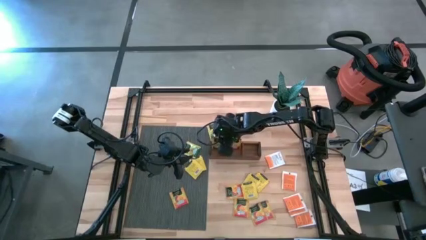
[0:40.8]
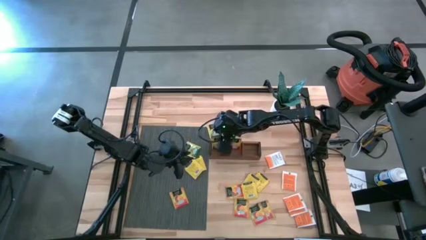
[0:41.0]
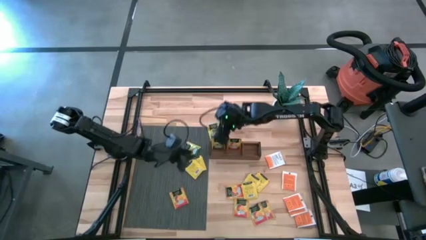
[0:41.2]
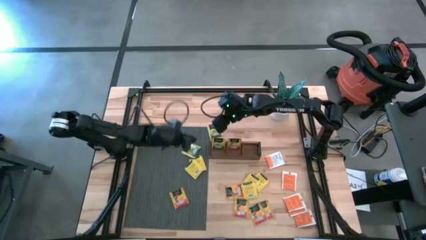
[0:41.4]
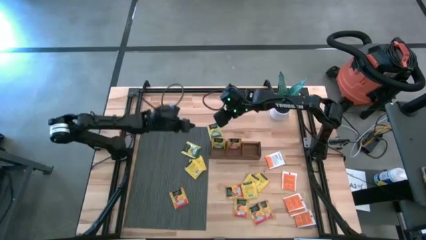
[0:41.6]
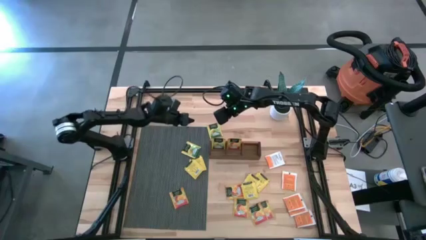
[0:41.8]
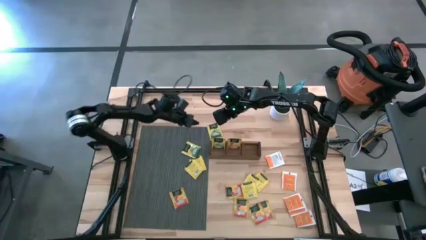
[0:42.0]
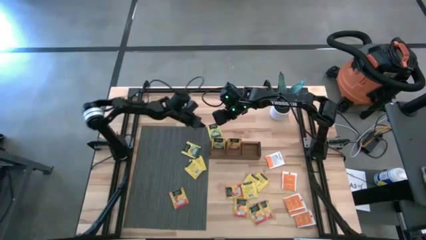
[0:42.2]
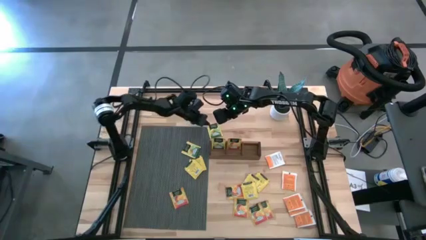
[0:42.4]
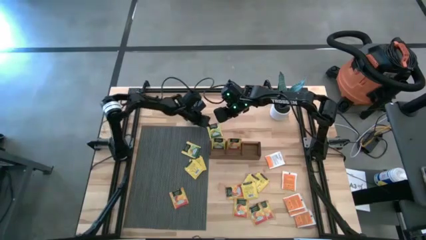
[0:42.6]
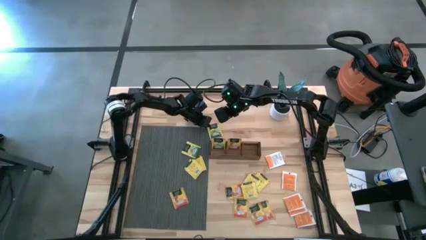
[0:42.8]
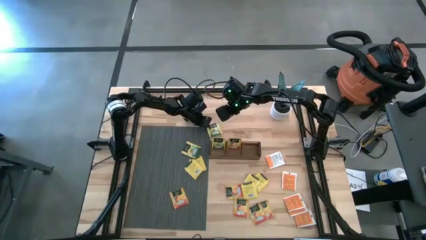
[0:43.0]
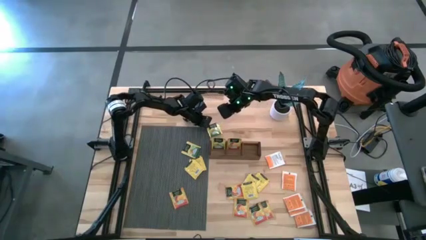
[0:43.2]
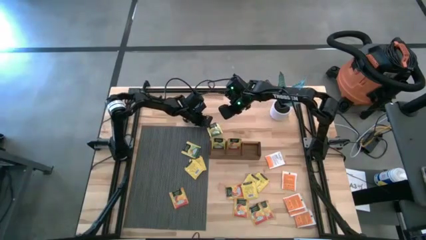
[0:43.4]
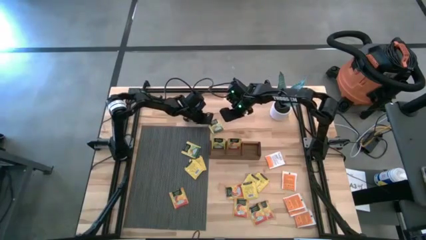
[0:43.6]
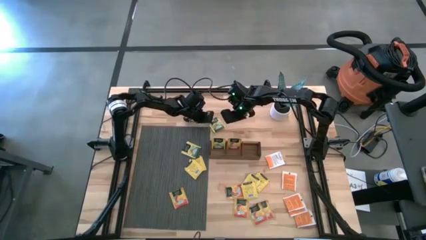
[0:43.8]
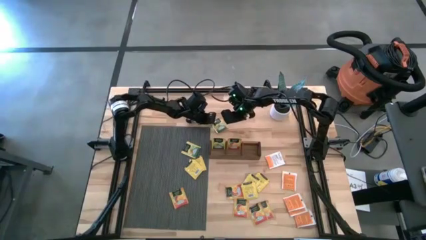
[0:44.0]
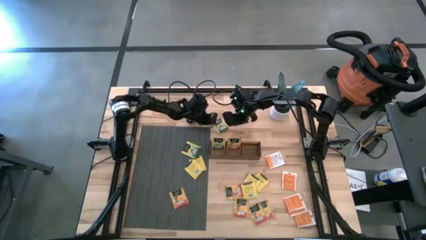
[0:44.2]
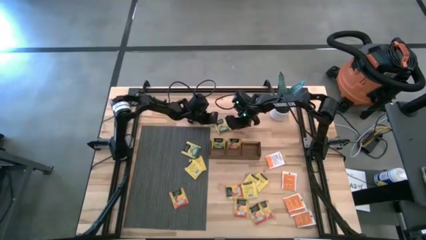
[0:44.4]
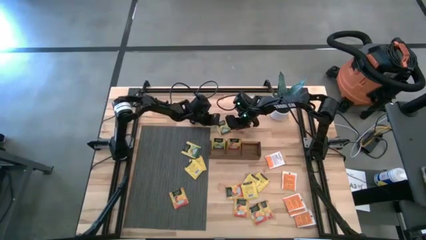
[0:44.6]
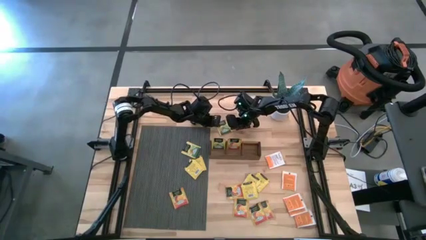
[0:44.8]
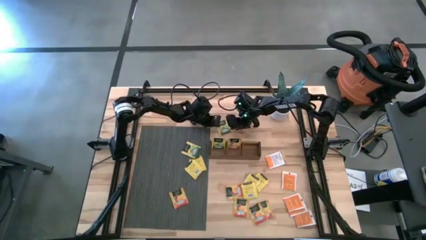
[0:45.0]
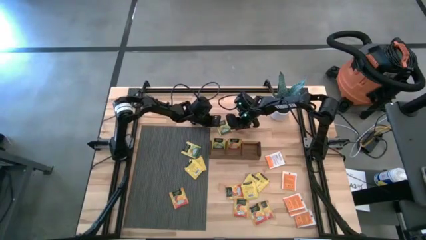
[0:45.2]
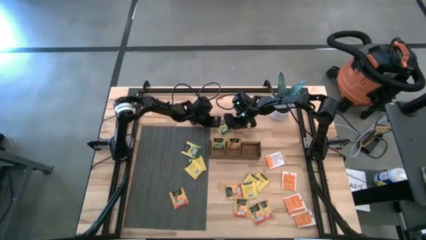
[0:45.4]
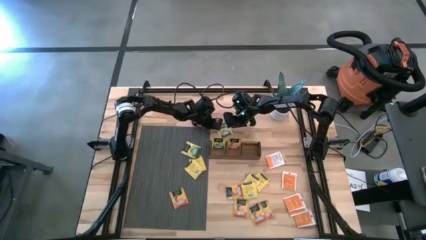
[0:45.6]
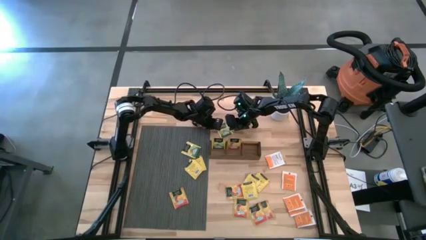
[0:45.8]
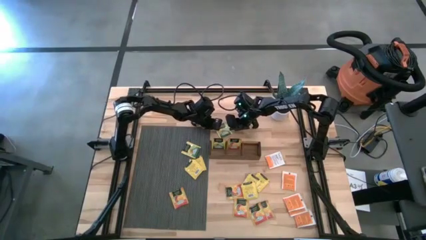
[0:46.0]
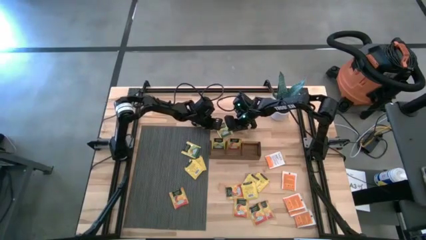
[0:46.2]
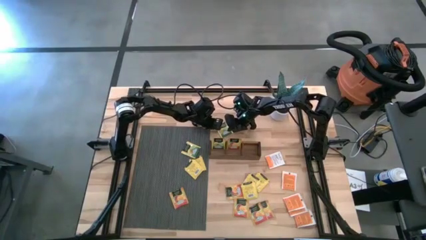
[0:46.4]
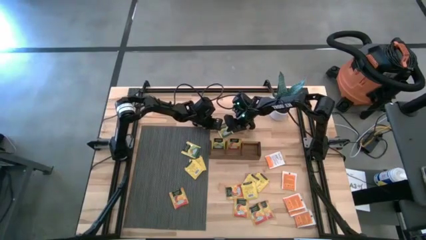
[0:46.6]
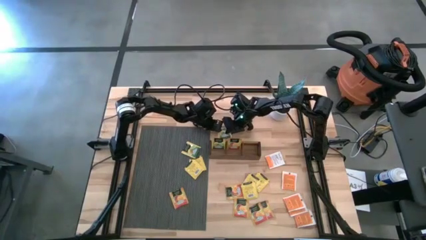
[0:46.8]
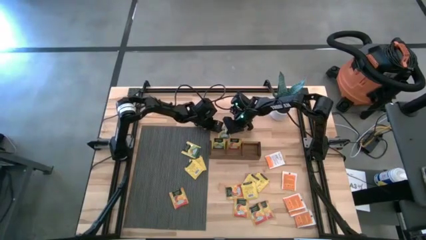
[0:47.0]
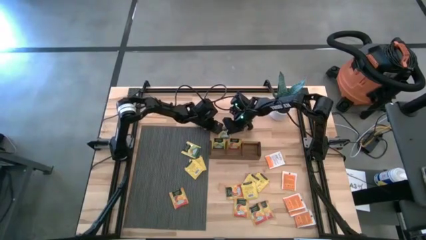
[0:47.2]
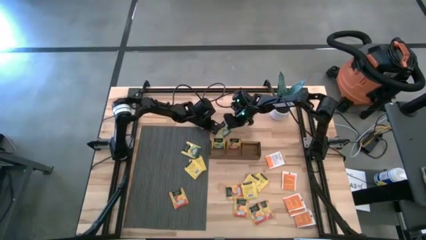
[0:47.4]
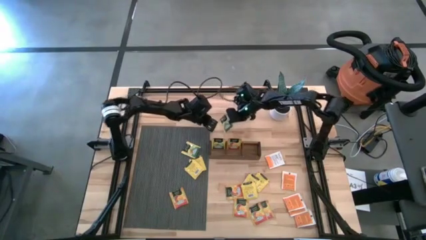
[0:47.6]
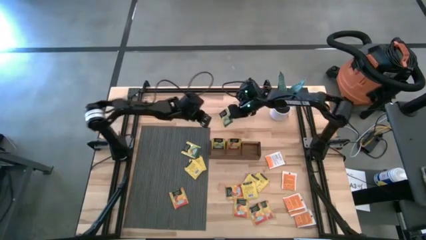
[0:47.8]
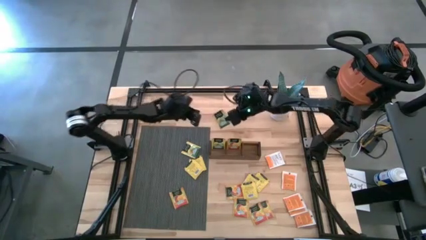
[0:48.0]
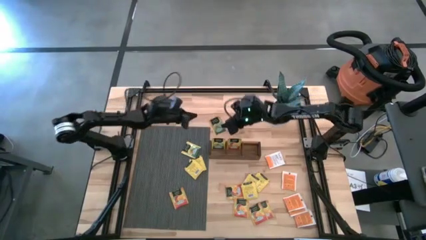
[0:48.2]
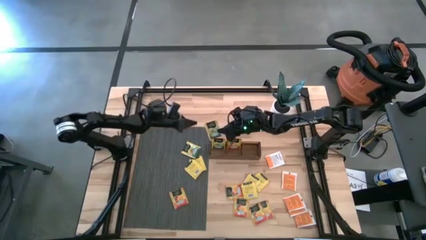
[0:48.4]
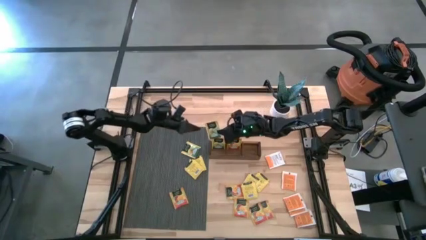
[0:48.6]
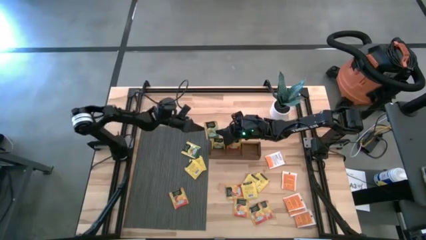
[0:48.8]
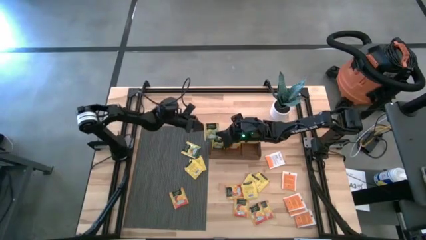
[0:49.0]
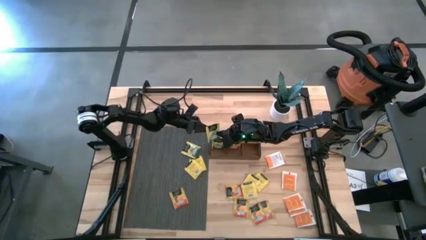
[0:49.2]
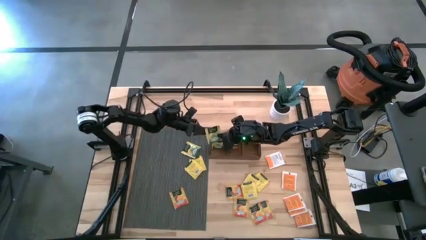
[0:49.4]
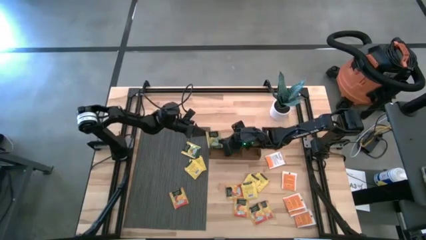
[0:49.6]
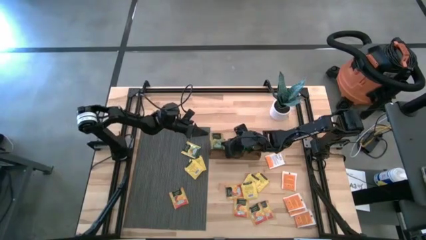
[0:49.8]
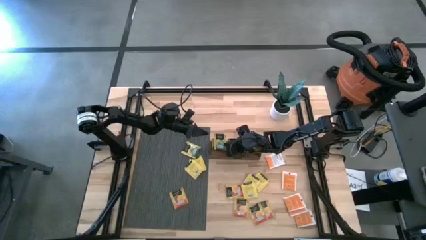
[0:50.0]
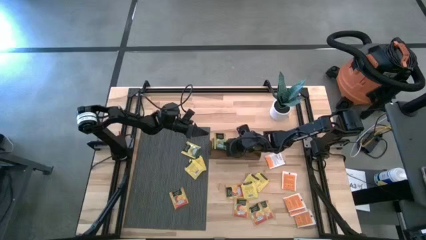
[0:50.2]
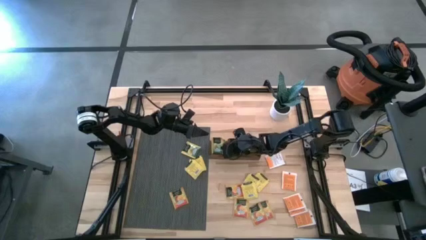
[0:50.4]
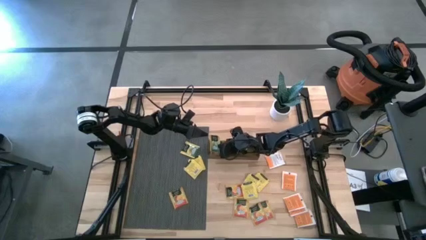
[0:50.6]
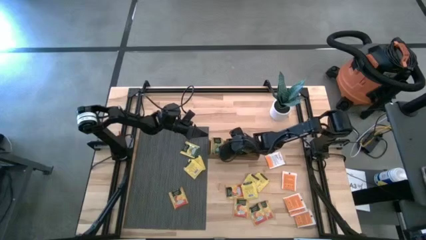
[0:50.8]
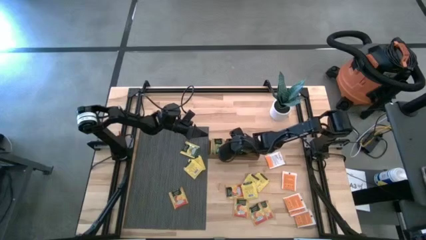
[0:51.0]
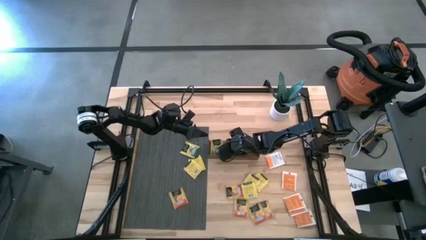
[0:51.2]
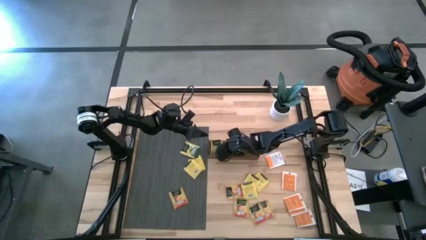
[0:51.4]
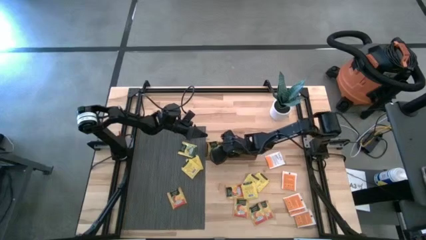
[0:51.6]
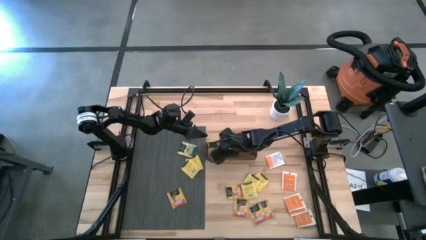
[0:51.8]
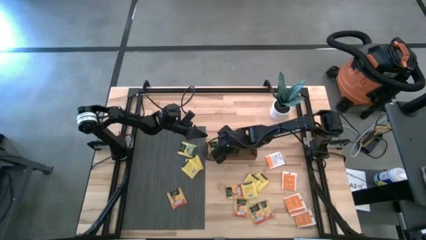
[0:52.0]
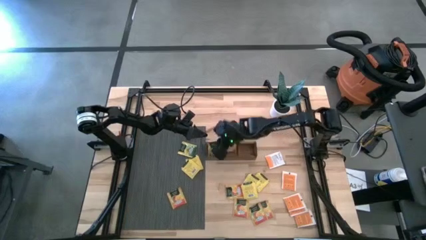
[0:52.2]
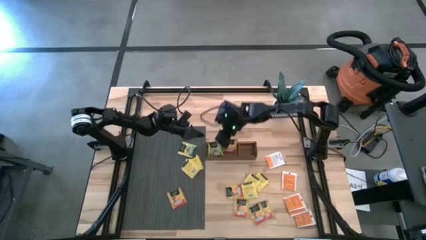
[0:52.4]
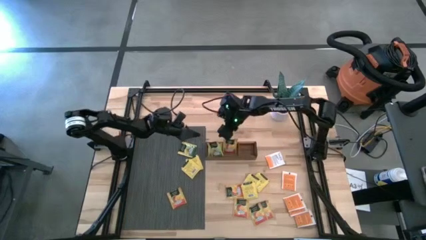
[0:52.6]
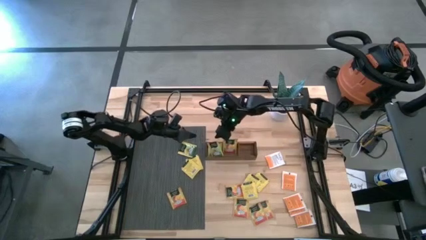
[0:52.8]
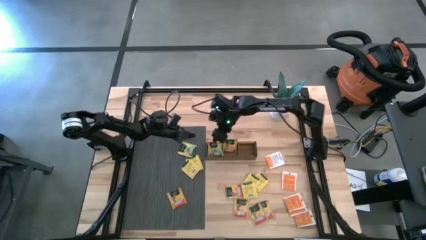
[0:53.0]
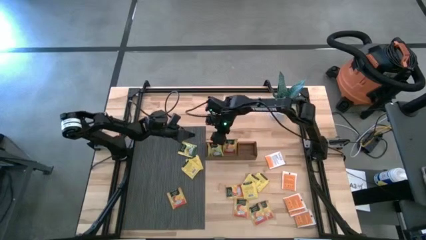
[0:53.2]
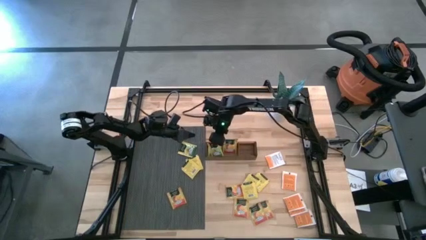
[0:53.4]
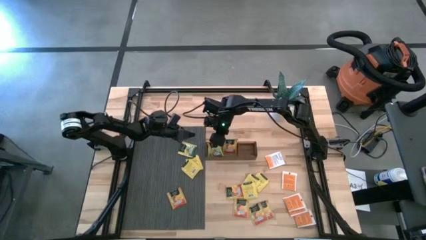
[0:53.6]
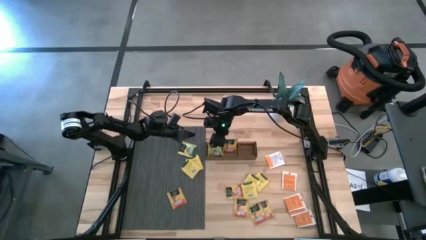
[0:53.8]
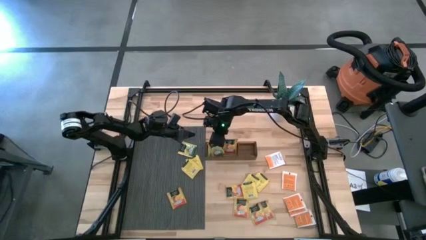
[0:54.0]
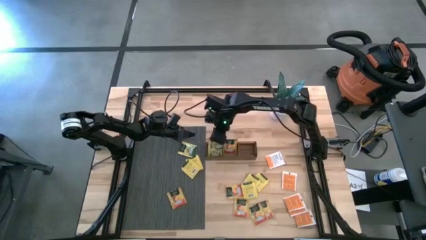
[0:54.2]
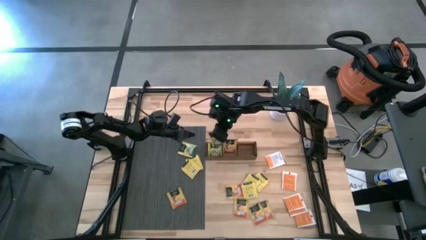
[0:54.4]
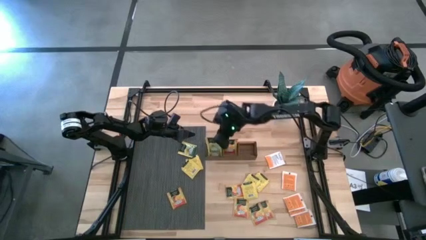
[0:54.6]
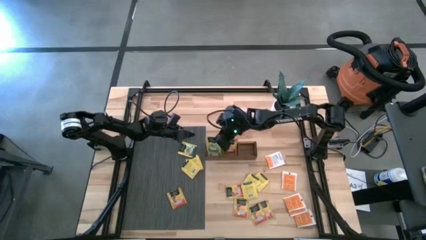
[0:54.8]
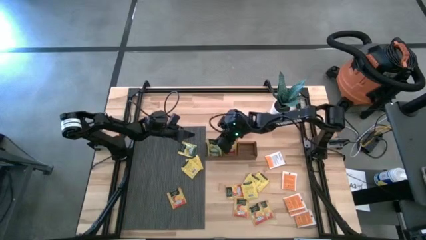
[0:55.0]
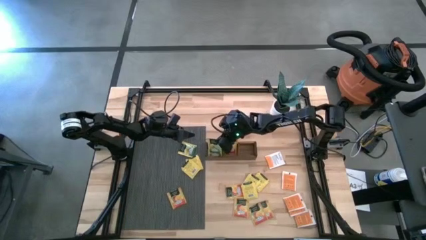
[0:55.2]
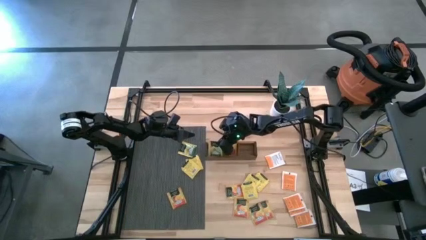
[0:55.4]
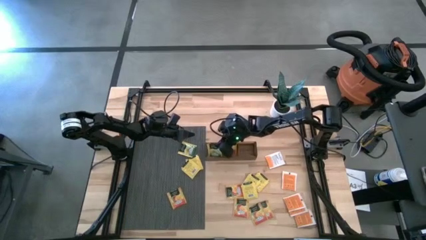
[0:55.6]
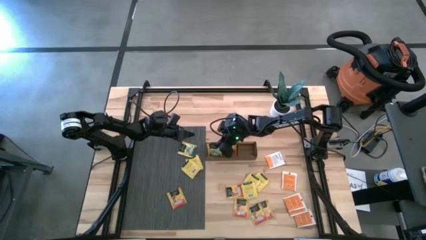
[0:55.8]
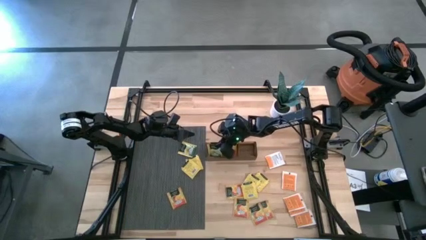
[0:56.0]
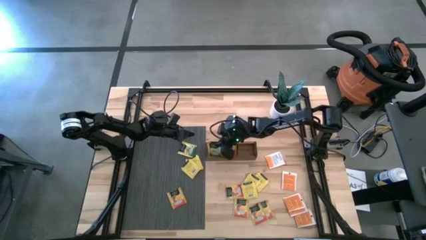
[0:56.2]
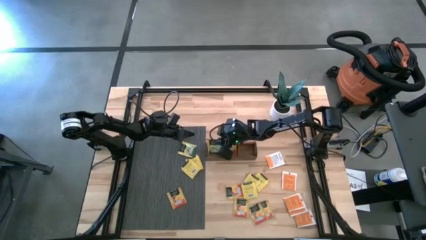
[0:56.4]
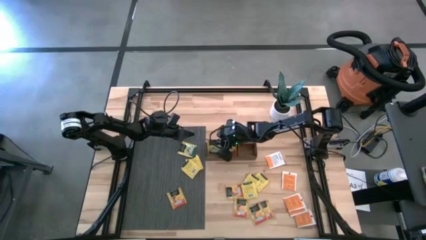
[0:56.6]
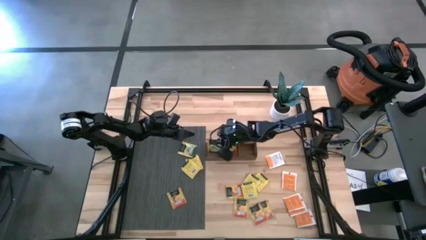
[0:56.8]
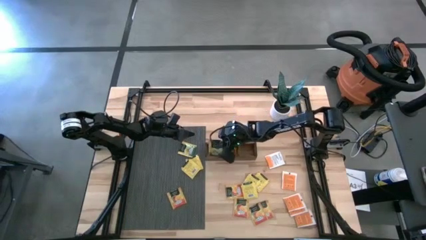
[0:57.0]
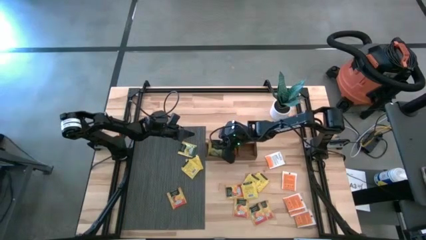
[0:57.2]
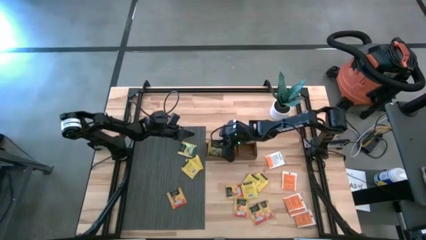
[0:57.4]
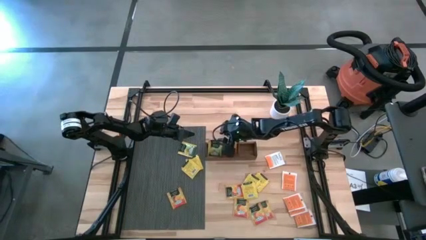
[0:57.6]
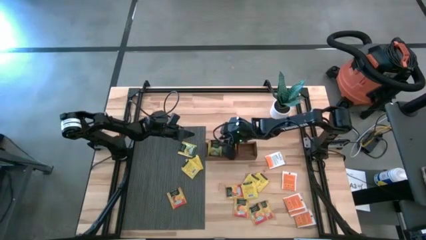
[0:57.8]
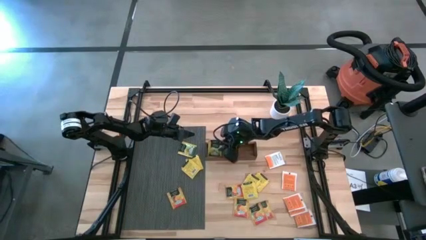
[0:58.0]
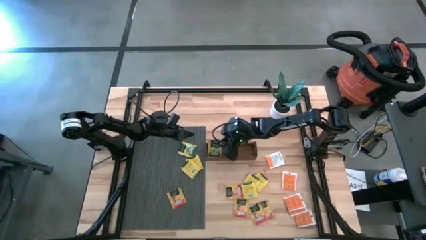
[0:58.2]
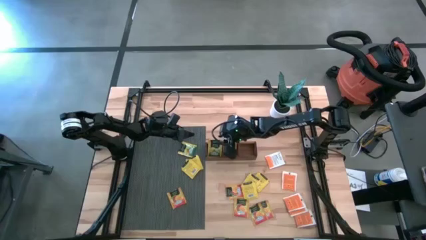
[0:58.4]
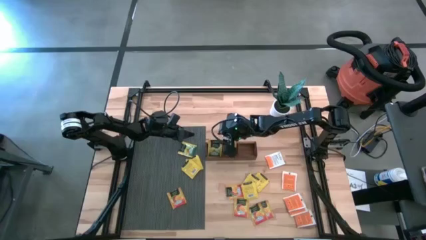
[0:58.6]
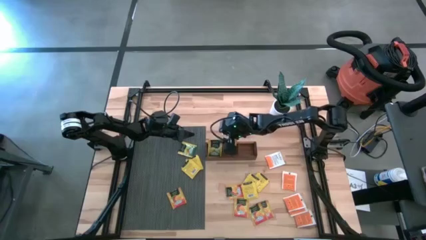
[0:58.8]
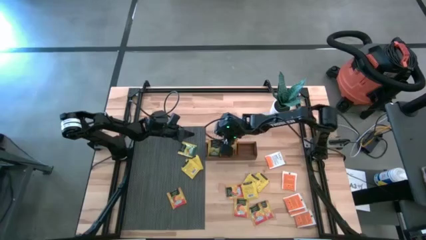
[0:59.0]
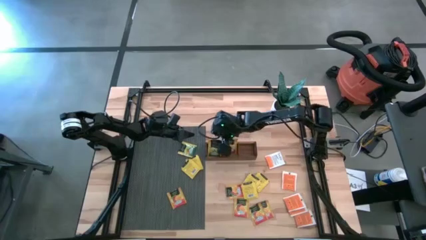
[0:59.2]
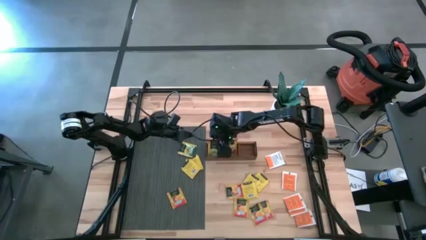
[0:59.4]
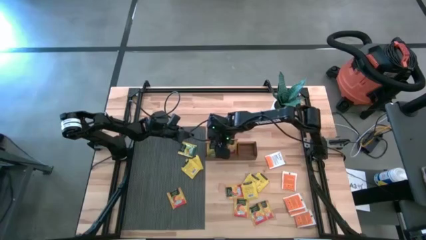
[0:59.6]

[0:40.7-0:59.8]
Task: Pick & Place Tea
Put the yellow tea bag into the middle section of the wooden organizer
